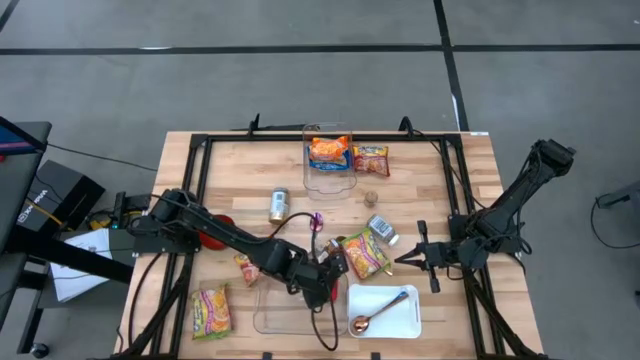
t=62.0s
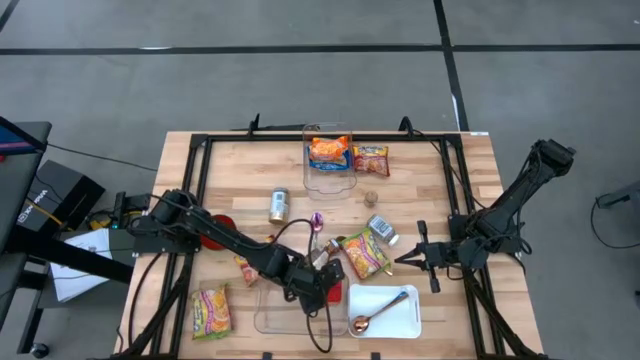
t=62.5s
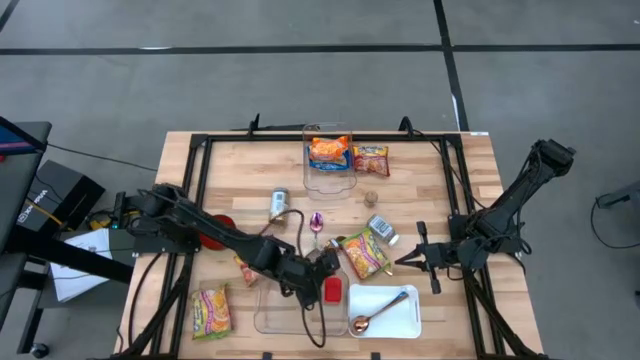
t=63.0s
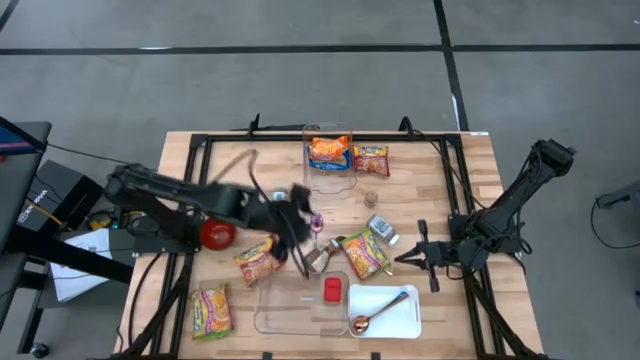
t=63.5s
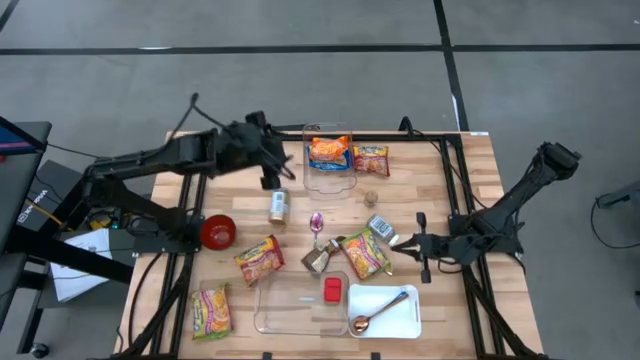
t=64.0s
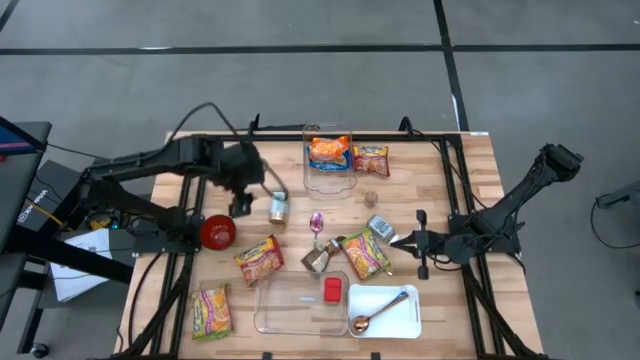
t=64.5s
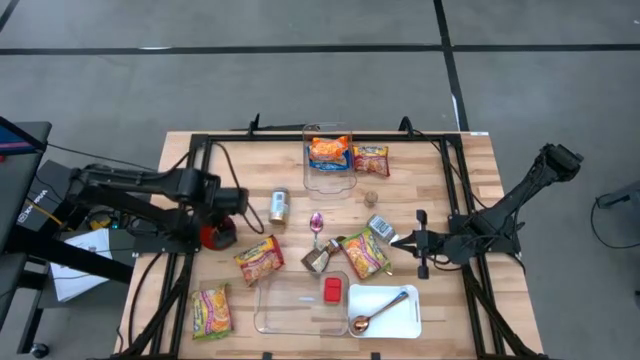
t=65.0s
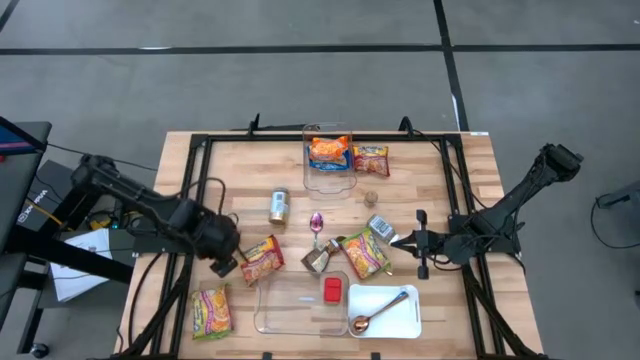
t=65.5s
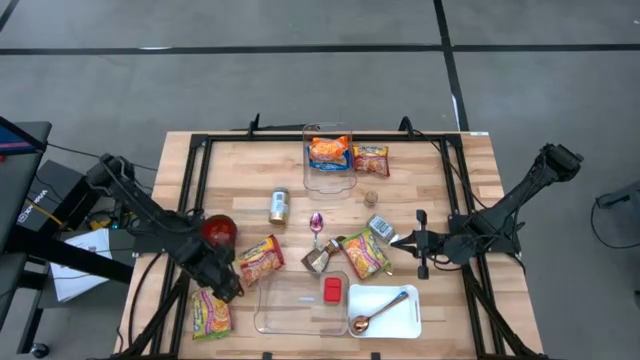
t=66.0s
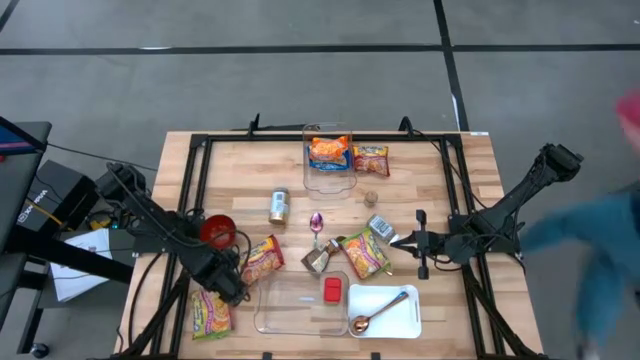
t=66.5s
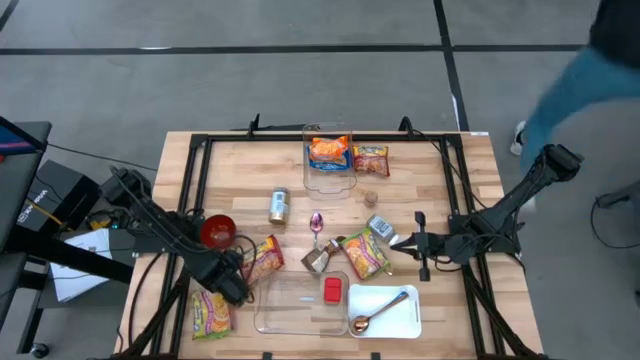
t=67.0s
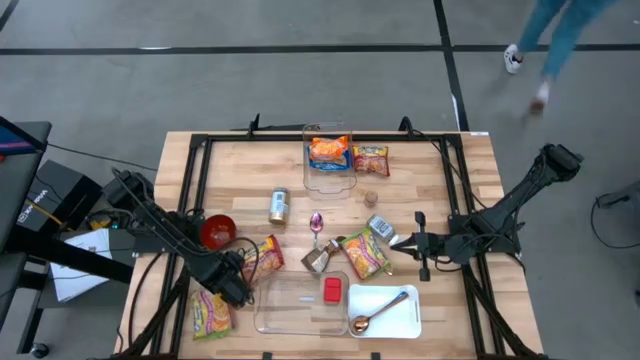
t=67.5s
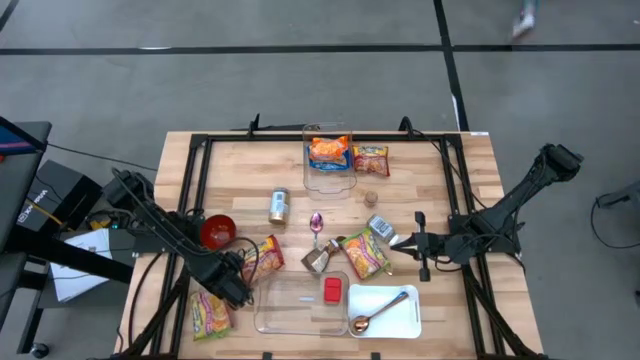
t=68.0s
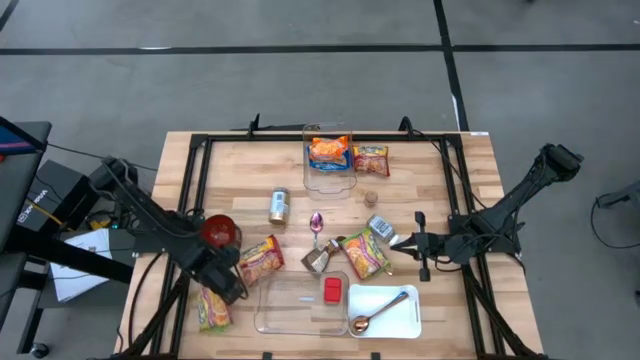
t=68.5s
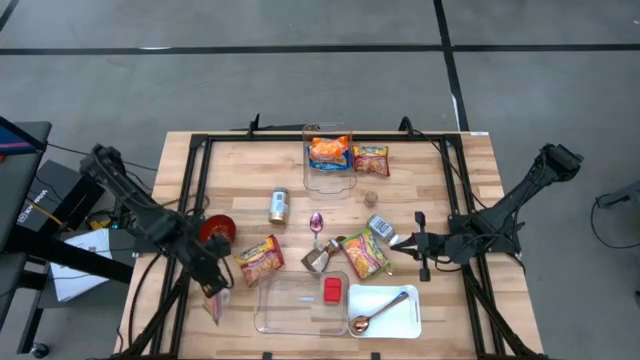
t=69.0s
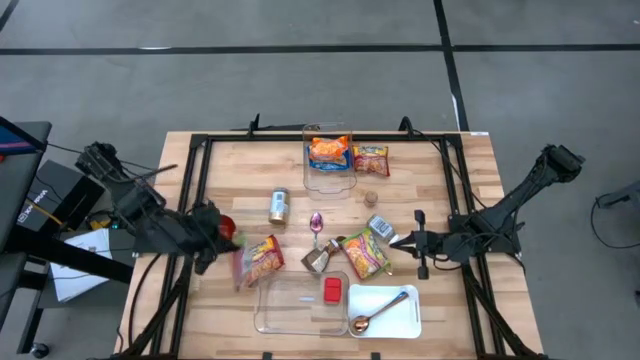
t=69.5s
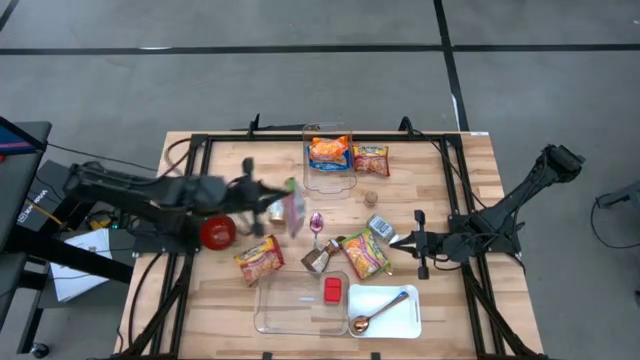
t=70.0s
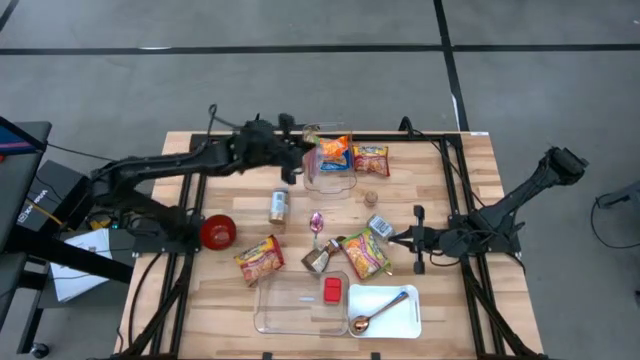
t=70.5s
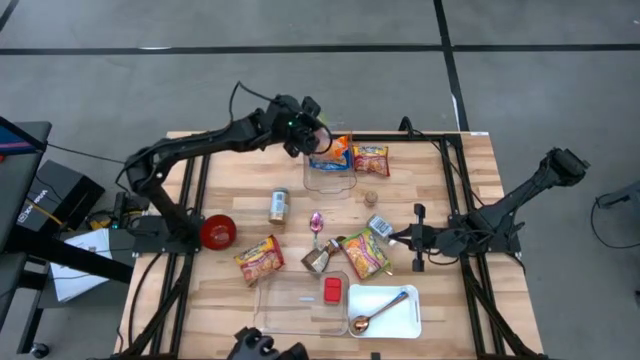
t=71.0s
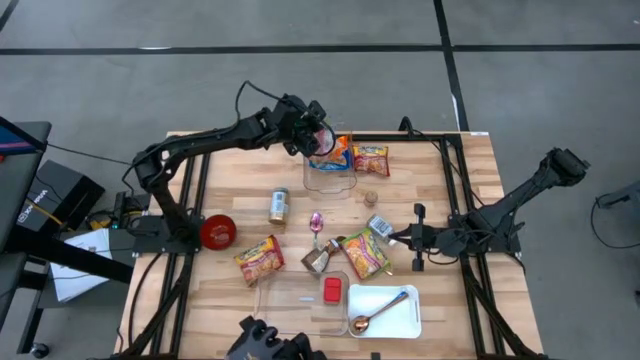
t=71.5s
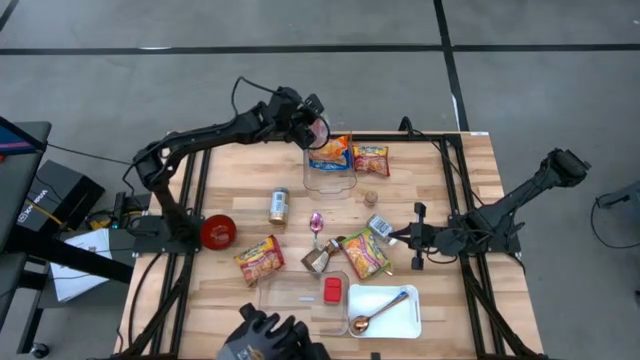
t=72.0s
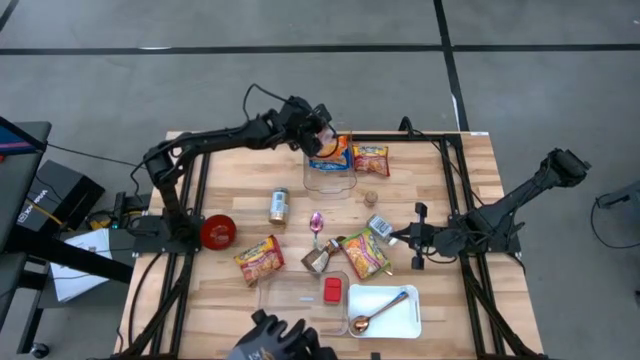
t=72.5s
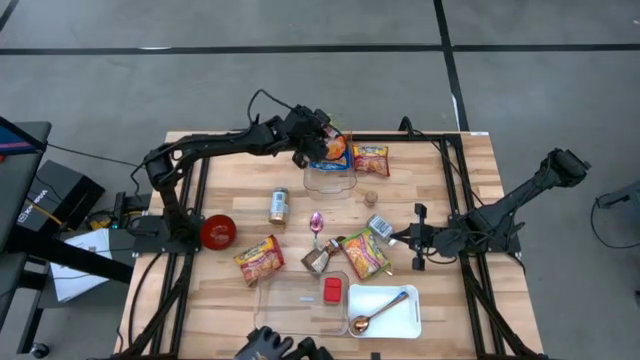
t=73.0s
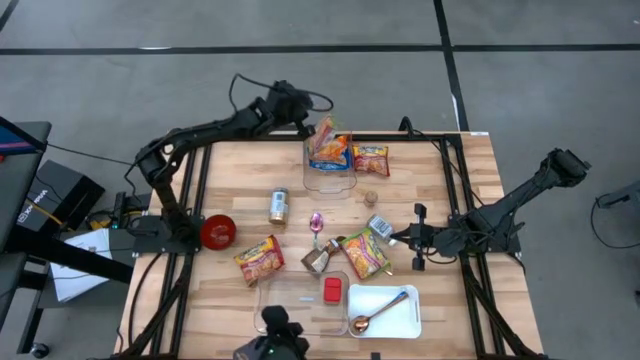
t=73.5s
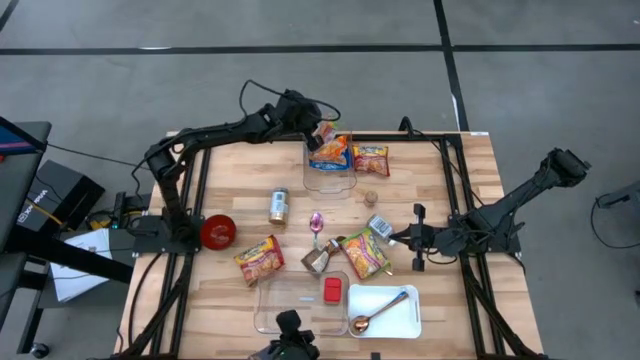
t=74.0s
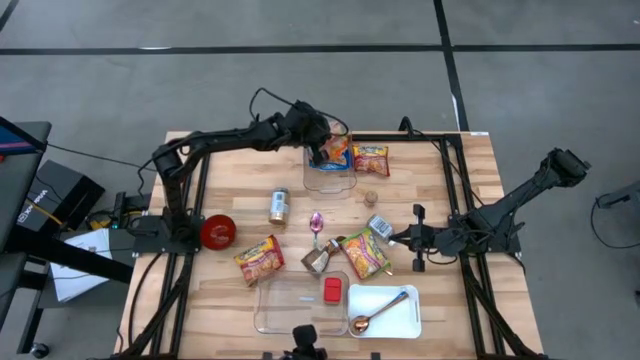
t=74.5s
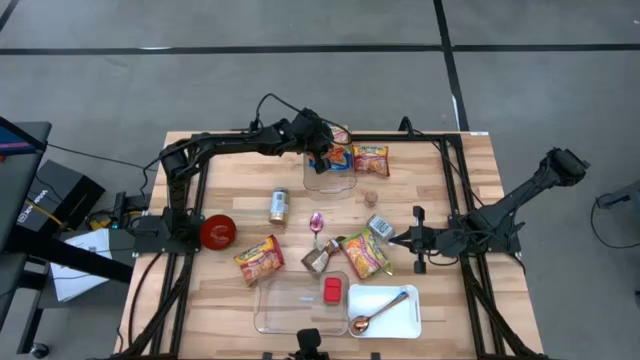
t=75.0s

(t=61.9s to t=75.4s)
Task: Pick & Place Food Item
Put the left green noodle pack into the top transparent bin

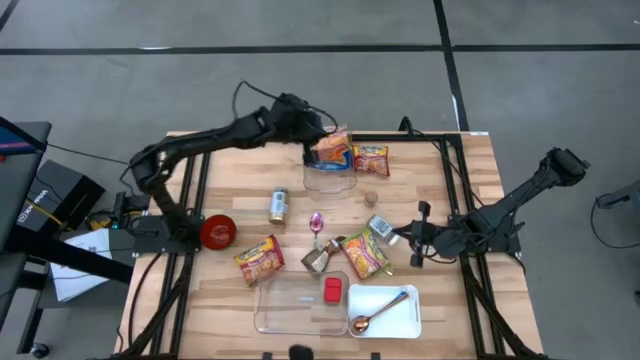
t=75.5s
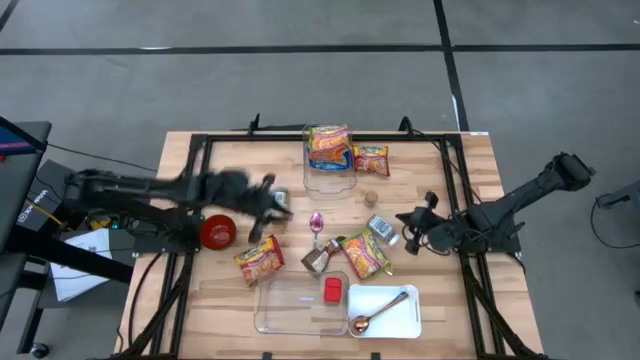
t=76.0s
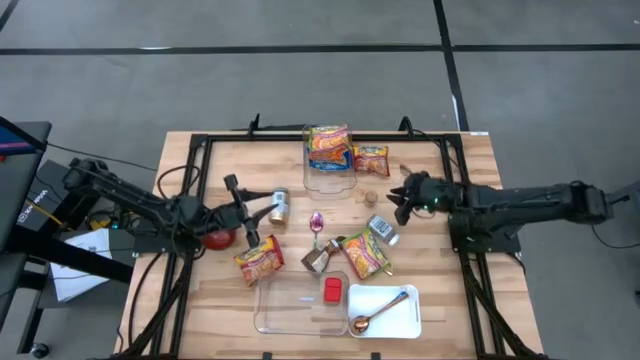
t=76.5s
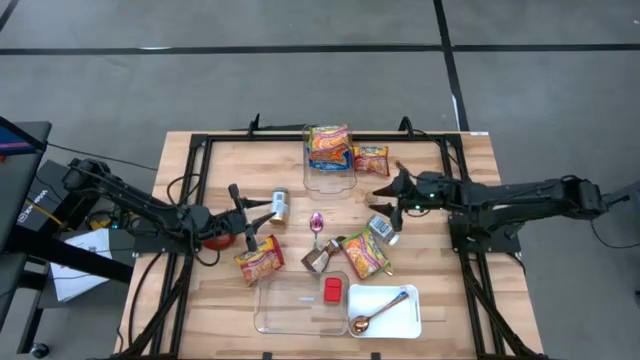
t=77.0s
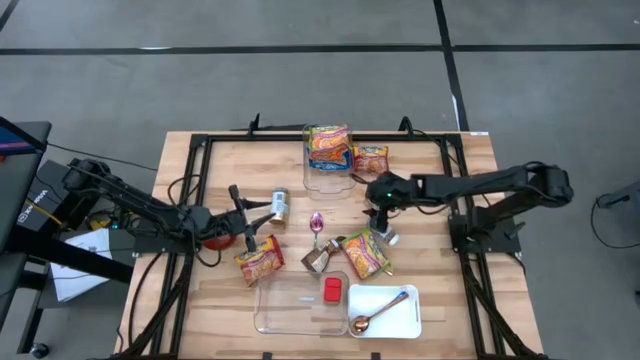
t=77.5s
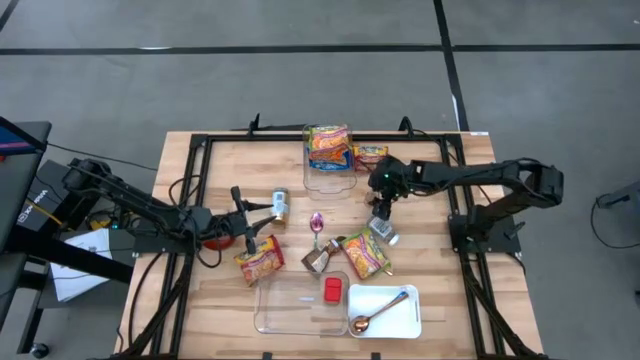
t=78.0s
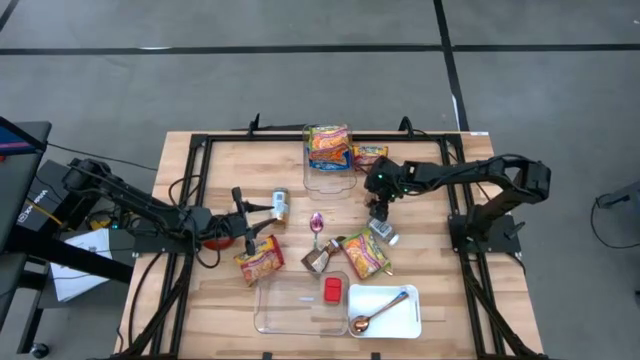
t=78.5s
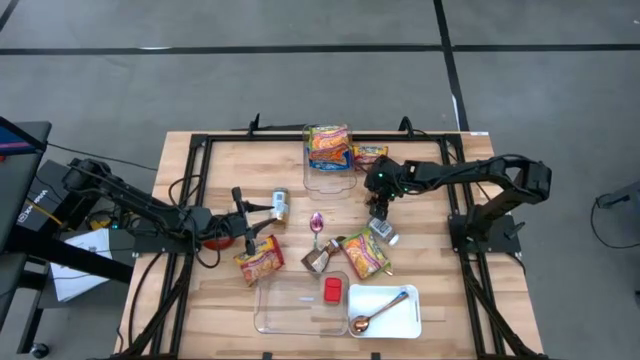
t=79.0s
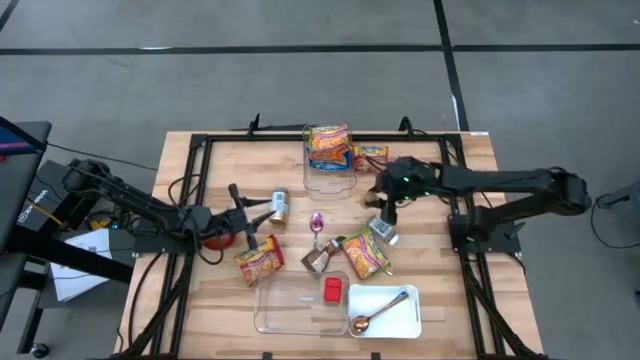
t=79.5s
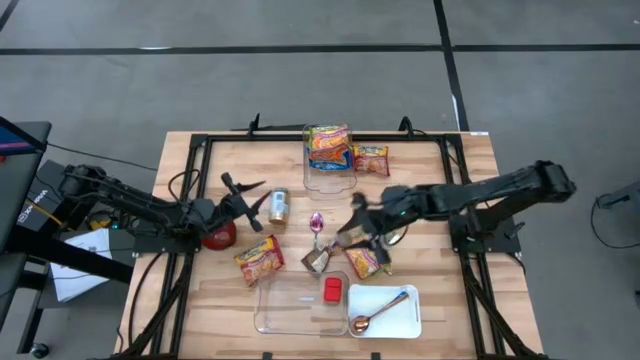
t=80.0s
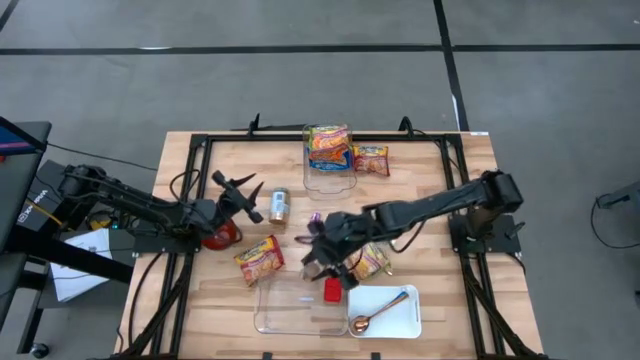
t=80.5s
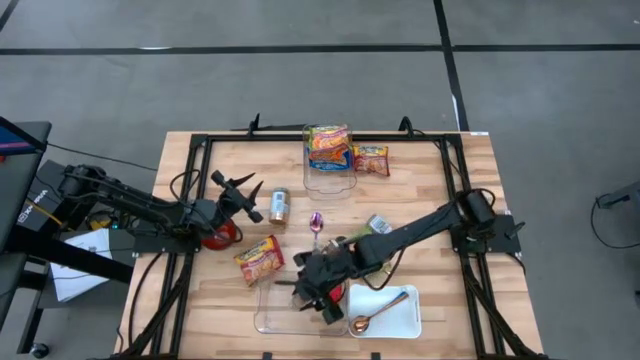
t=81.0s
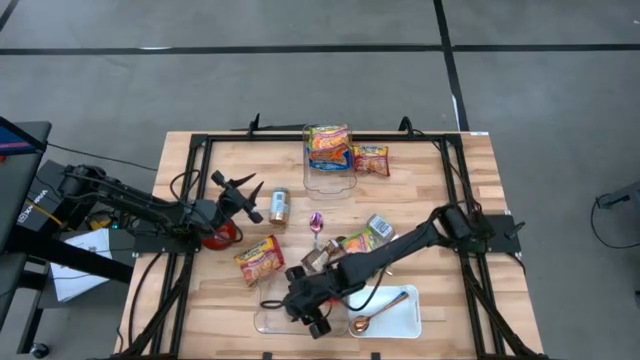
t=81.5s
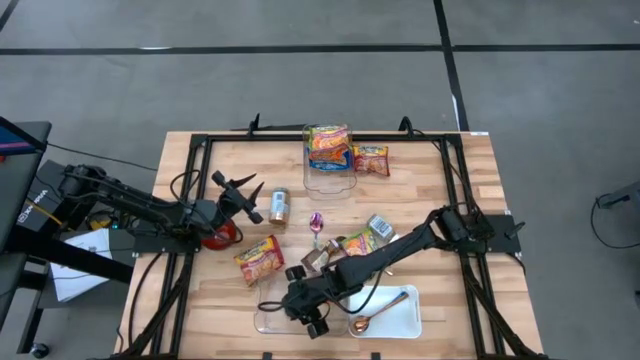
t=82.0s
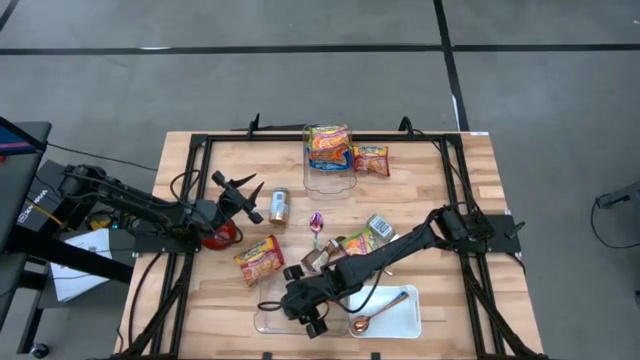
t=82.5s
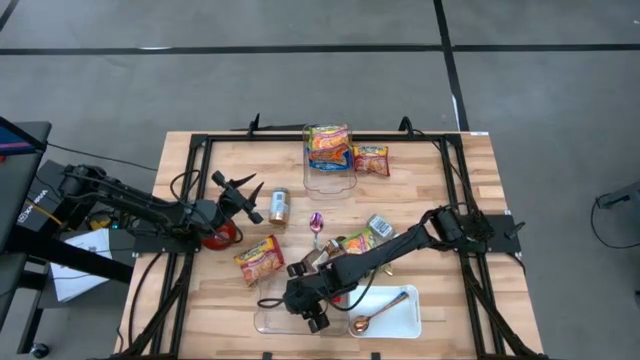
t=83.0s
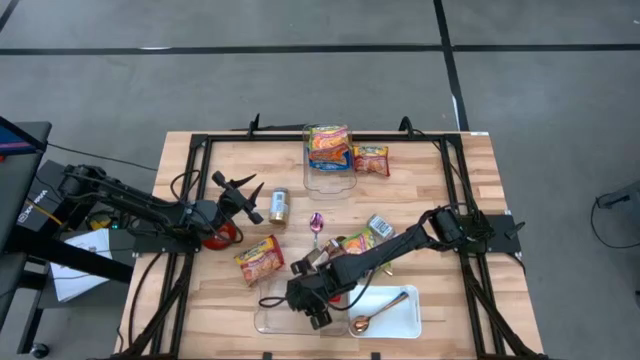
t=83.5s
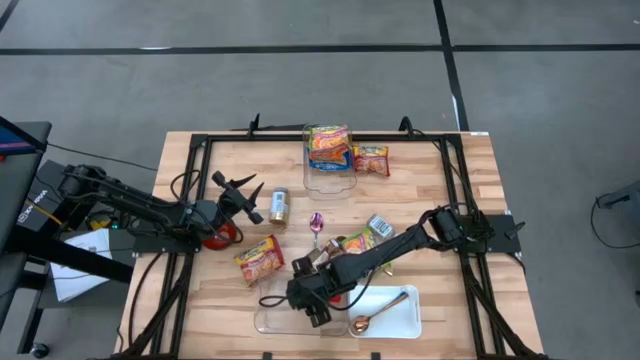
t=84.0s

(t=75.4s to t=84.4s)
Put the brown seasoning bottle into the bottom transparent bin
